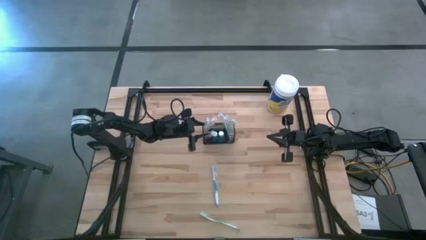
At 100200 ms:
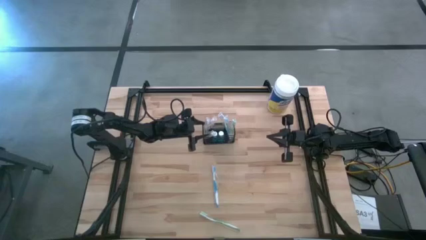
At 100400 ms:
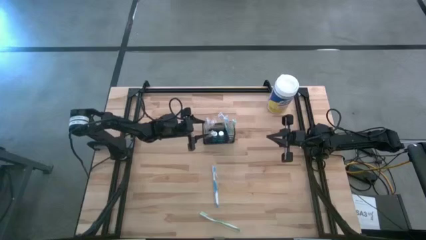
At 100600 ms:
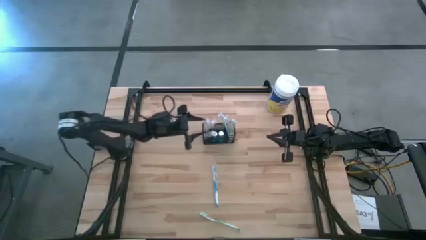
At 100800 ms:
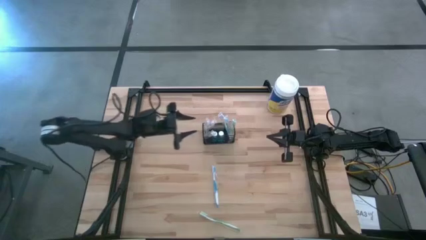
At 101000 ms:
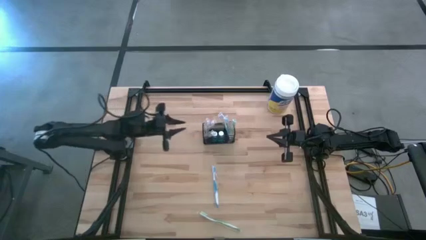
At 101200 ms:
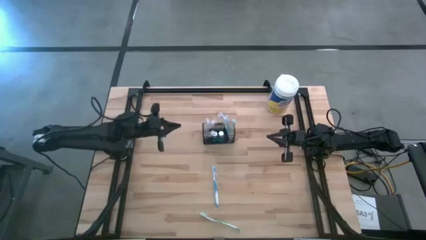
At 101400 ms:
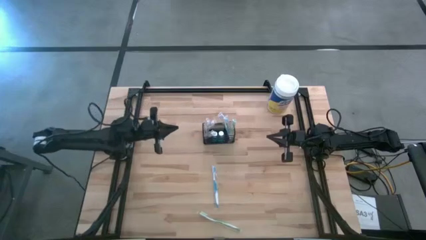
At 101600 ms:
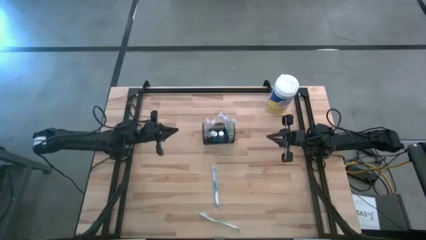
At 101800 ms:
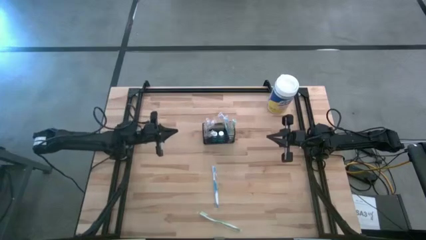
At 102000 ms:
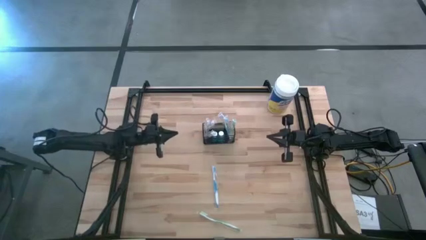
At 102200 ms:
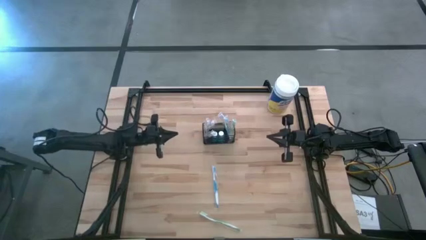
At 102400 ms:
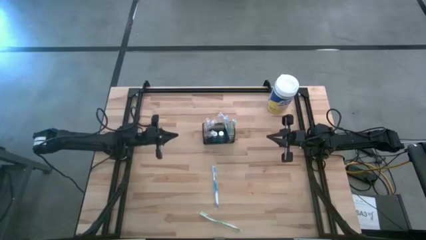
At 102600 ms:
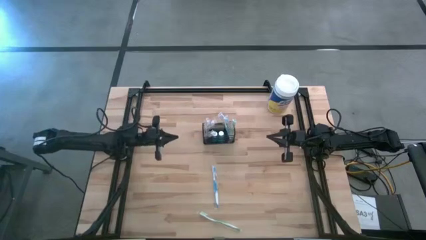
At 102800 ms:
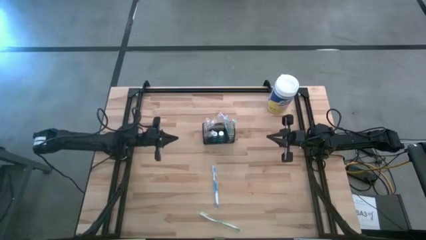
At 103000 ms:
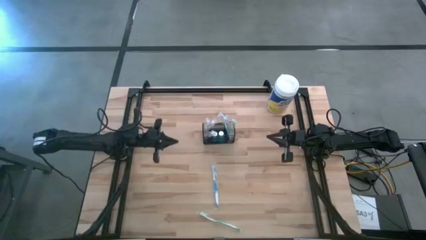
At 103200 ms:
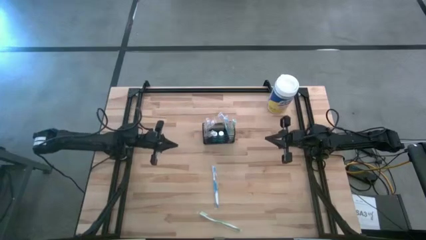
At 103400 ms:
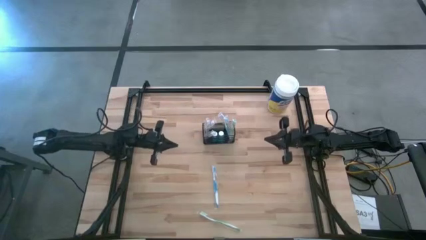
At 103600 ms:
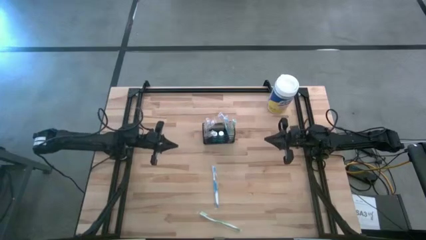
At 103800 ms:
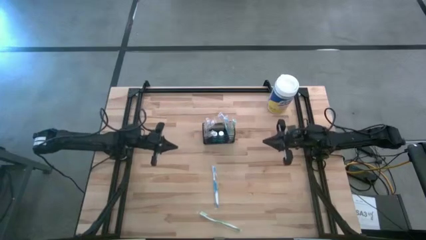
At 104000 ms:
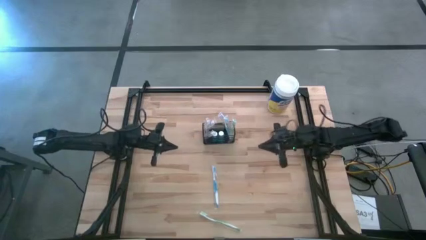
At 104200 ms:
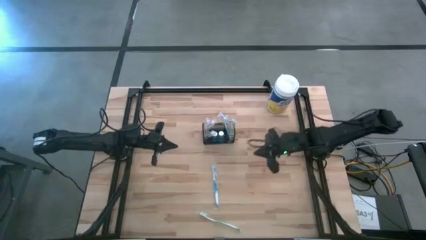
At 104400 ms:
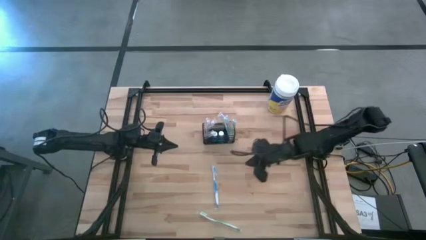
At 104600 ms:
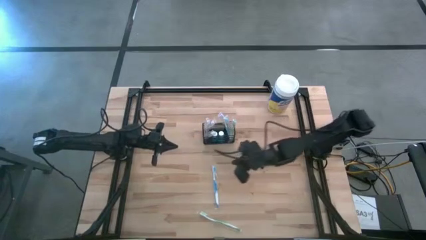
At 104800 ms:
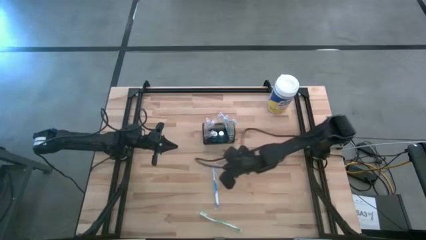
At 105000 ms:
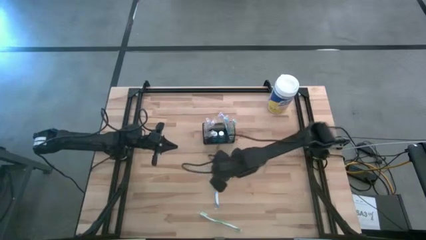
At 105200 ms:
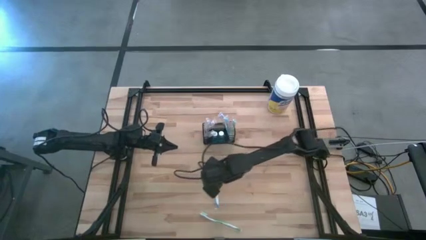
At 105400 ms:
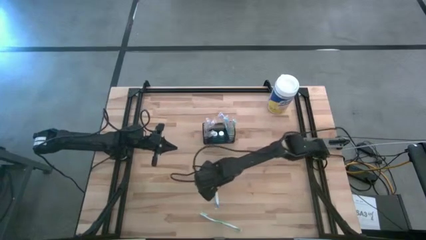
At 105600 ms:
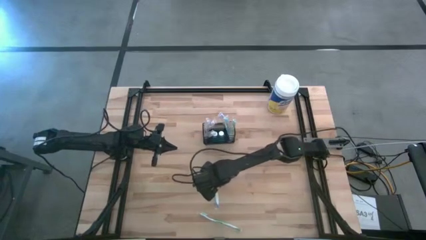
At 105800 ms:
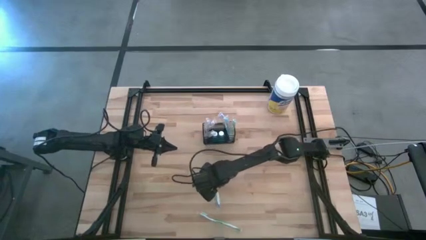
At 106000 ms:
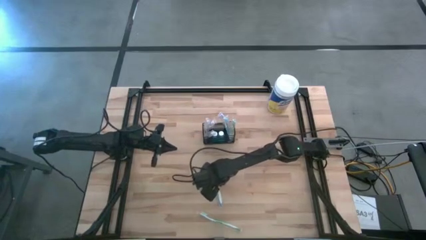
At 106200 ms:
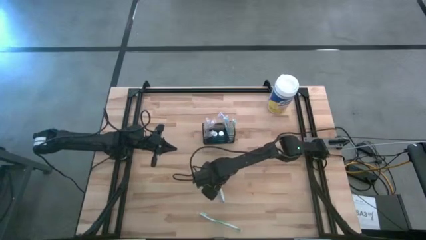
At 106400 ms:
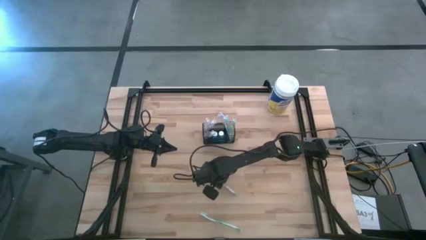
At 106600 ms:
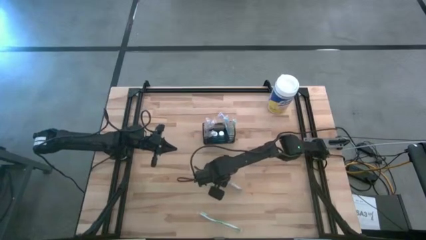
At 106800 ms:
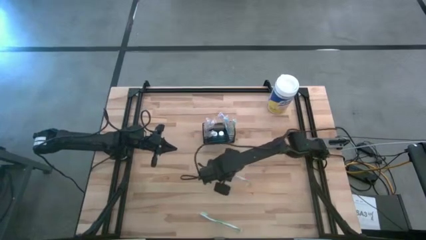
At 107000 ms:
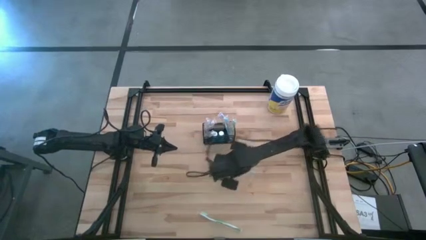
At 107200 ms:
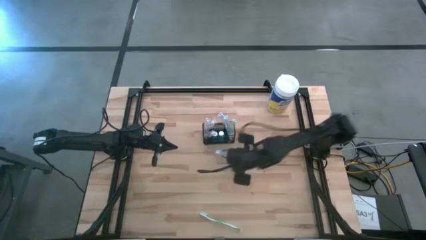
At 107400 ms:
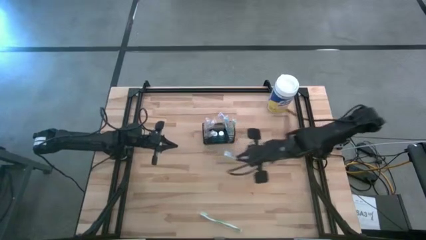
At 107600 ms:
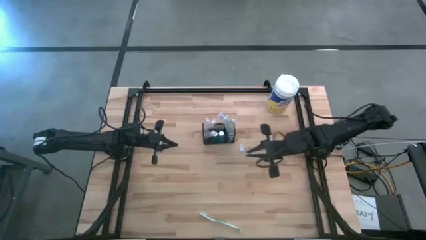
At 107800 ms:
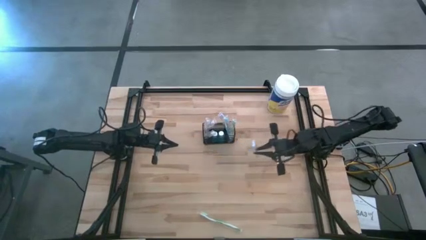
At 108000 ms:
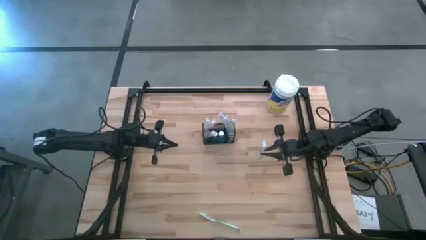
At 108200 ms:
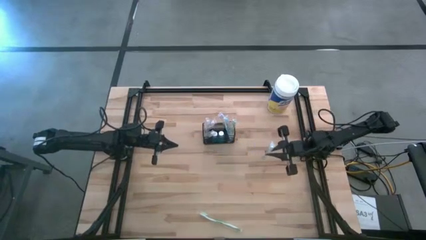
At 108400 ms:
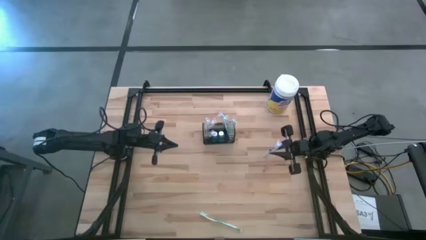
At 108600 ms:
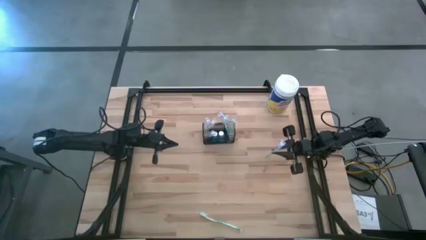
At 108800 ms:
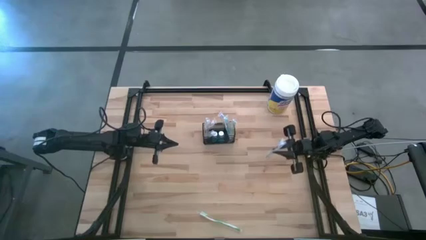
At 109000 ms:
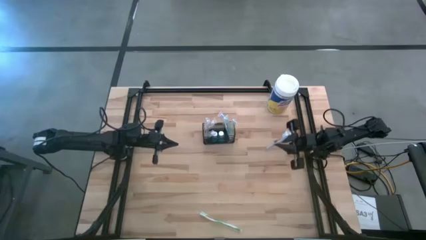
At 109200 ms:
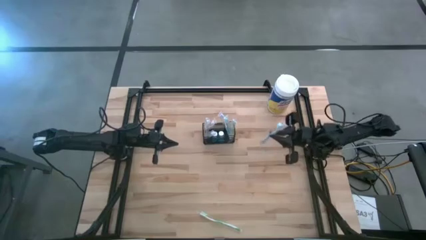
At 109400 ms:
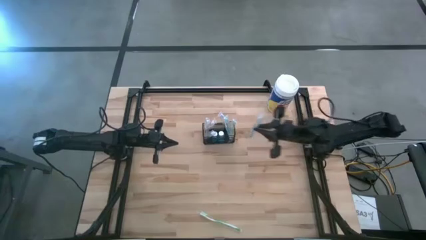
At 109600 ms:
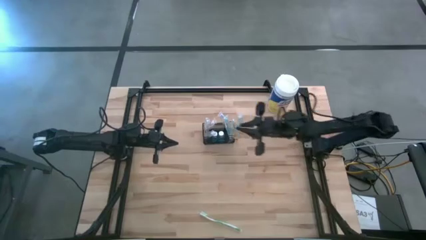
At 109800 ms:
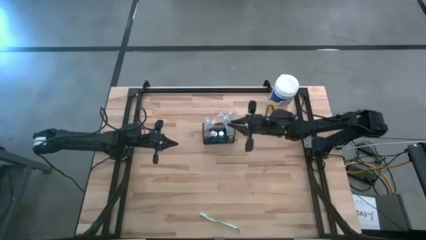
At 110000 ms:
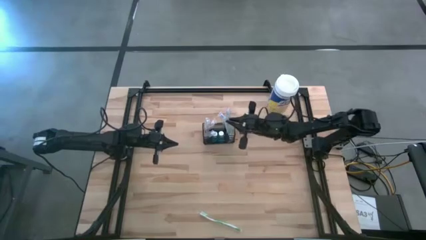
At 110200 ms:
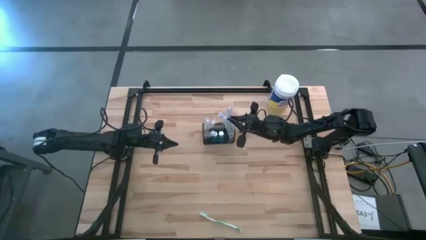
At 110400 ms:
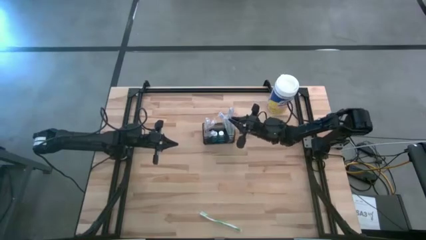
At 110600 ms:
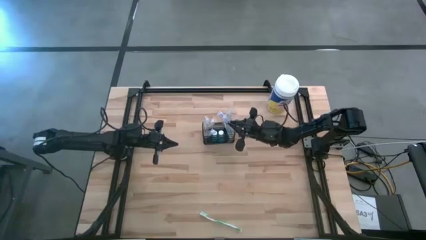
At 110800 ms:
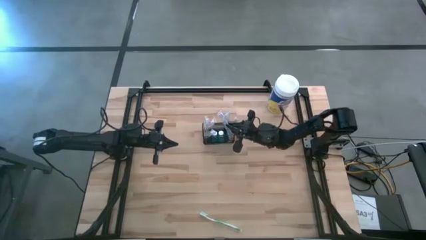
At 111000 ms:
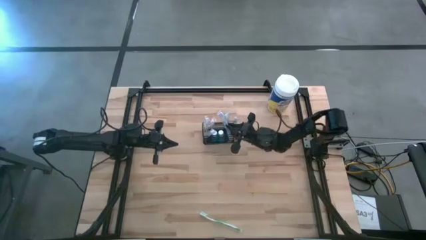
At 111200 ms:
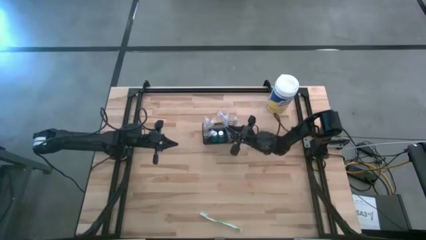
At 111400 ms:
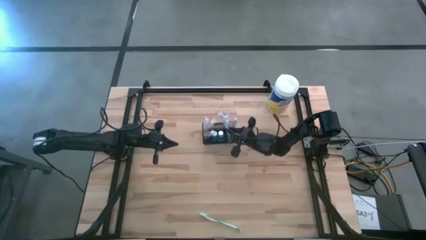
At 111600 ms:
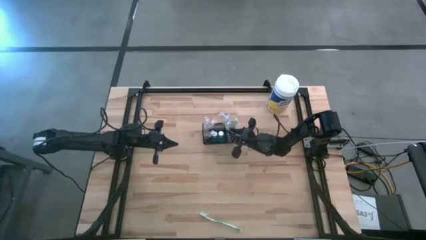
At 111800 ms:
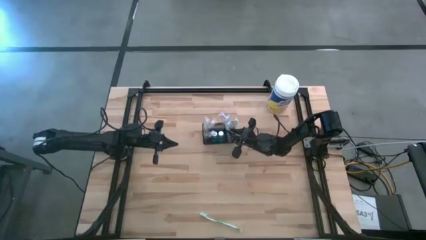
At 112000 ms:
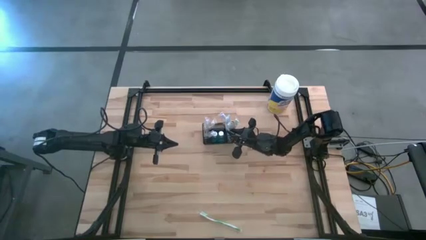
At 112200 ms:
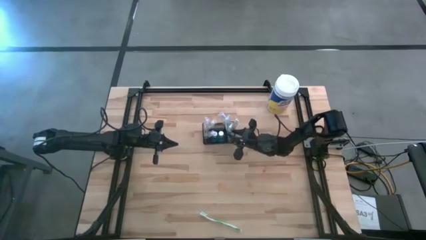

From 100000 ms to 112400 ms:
Task: Pick & Place toothbrushing station
Put the blue toothbrush into the mesh organizer
